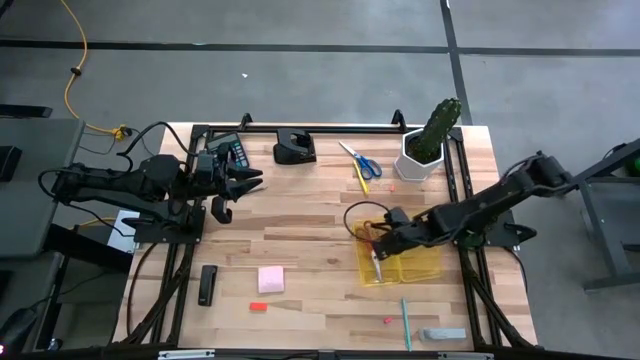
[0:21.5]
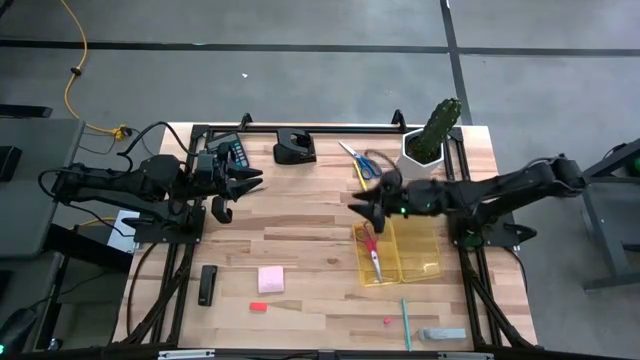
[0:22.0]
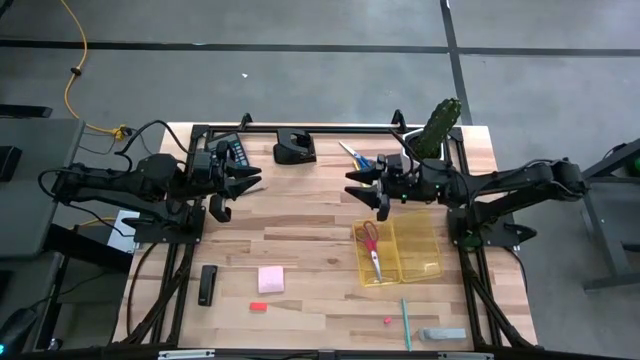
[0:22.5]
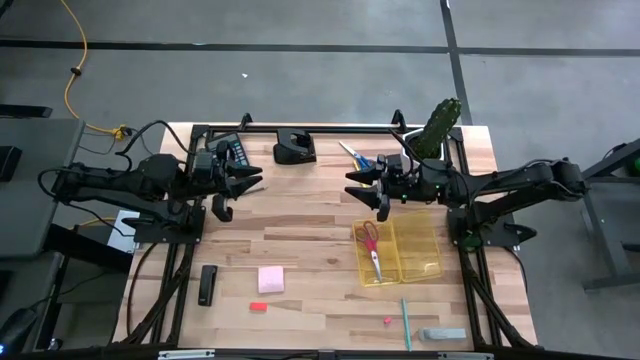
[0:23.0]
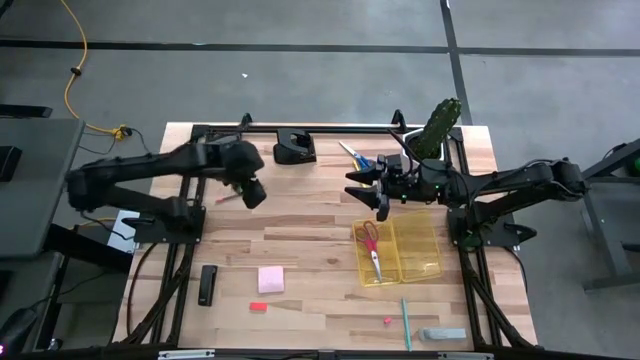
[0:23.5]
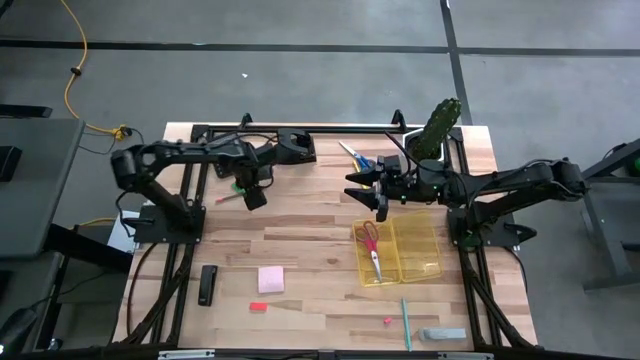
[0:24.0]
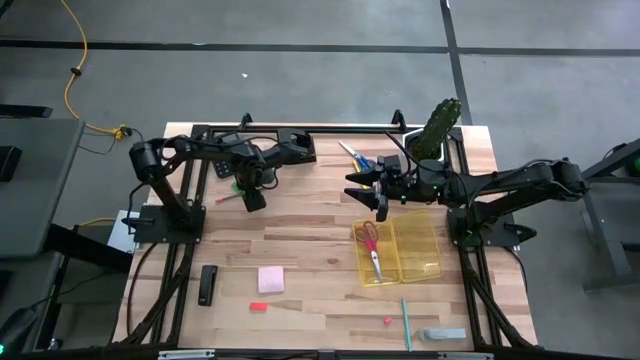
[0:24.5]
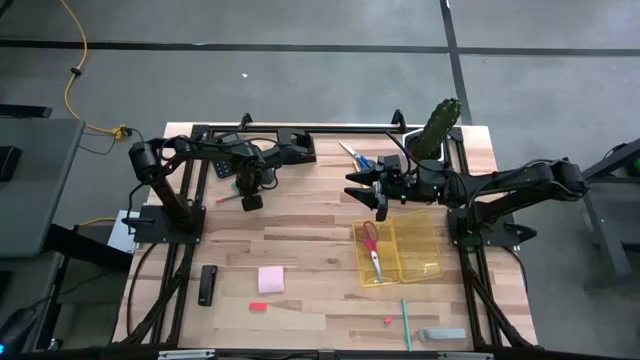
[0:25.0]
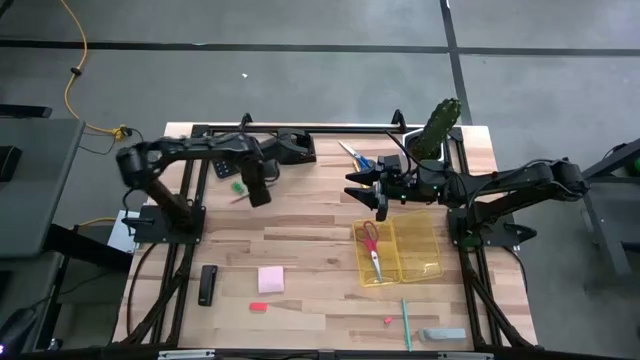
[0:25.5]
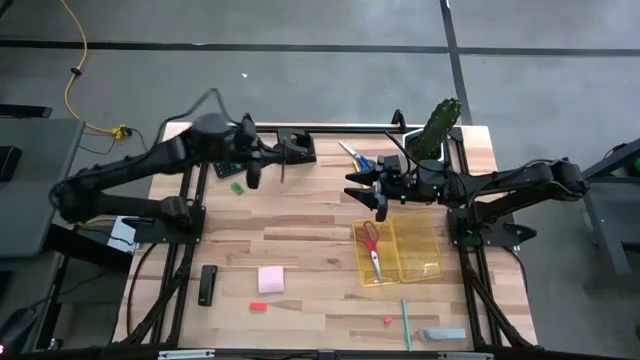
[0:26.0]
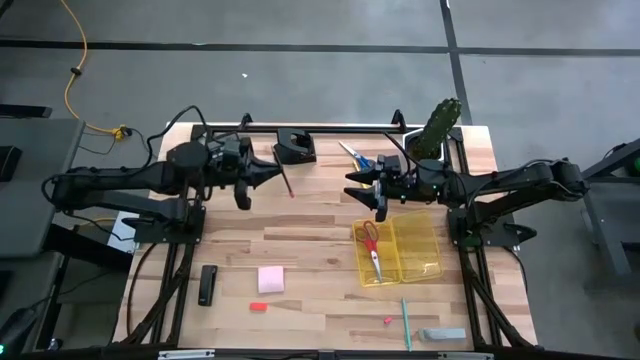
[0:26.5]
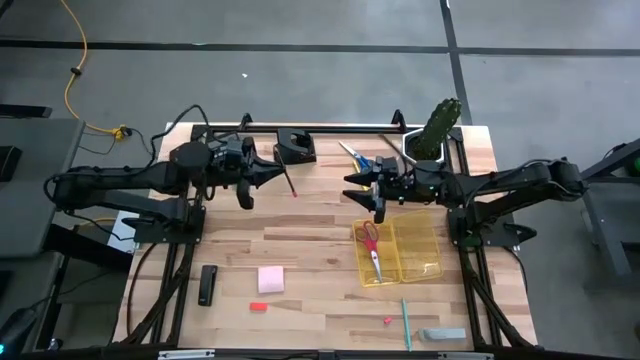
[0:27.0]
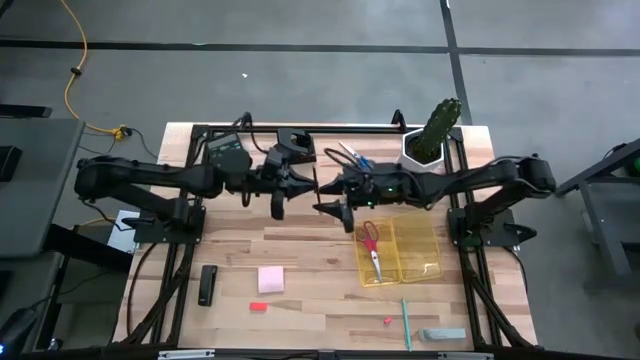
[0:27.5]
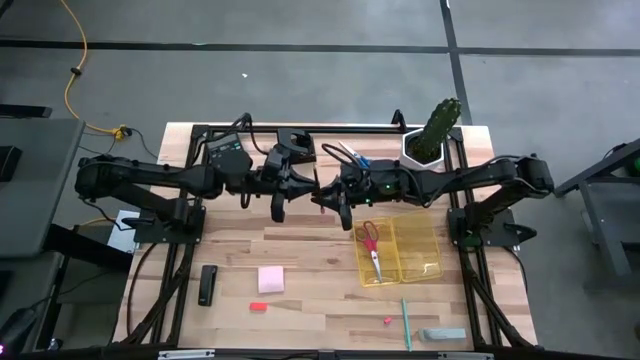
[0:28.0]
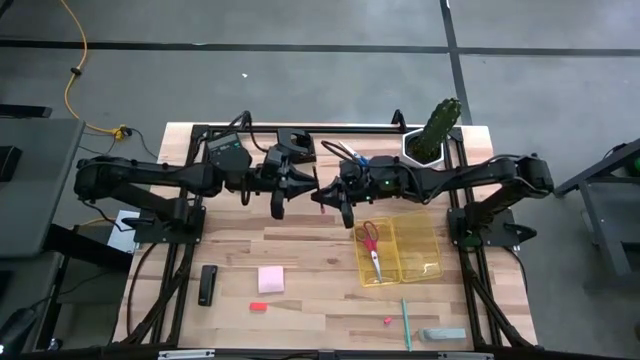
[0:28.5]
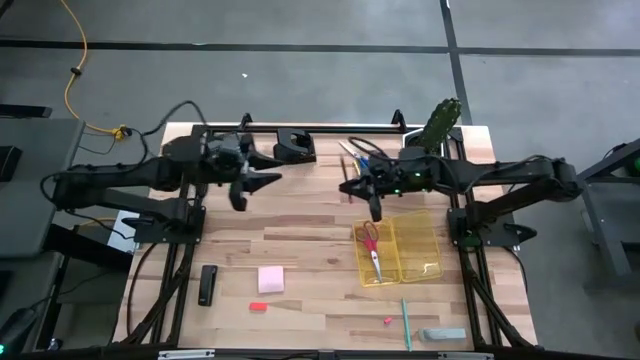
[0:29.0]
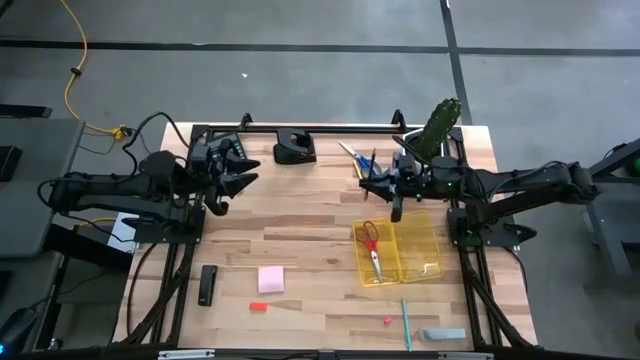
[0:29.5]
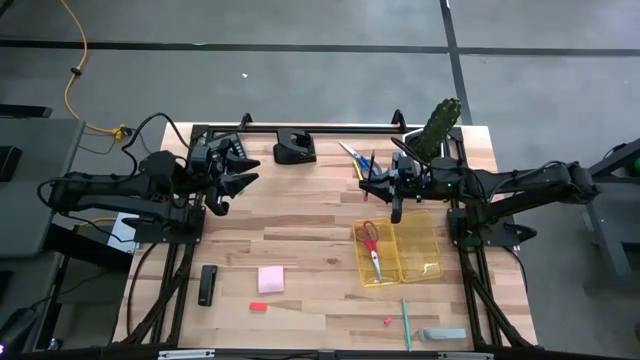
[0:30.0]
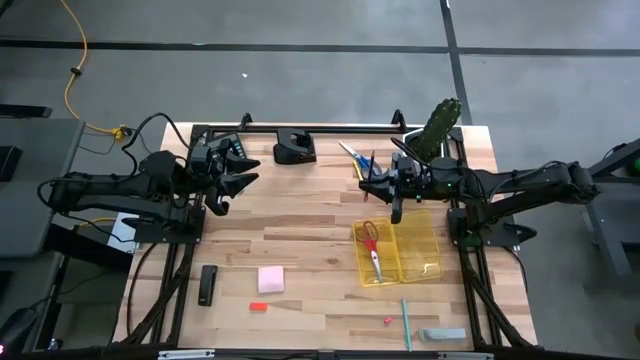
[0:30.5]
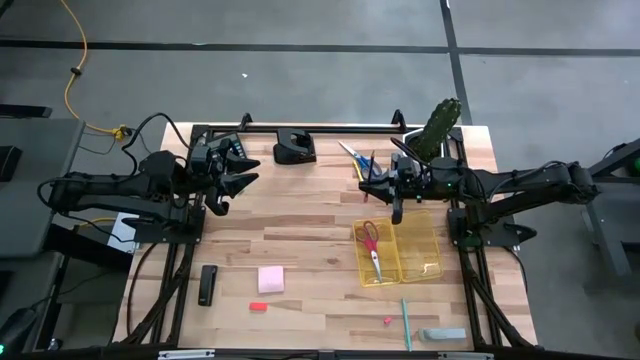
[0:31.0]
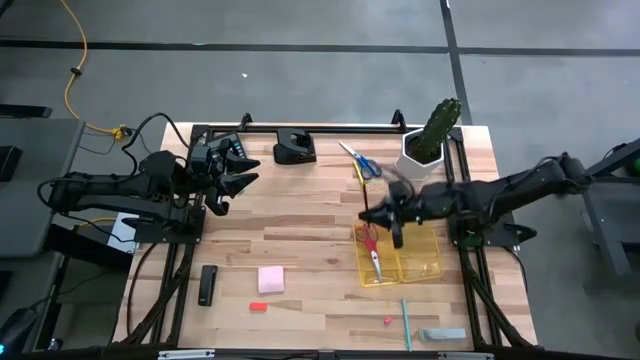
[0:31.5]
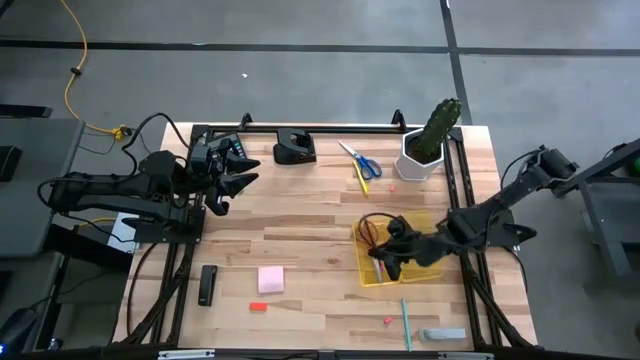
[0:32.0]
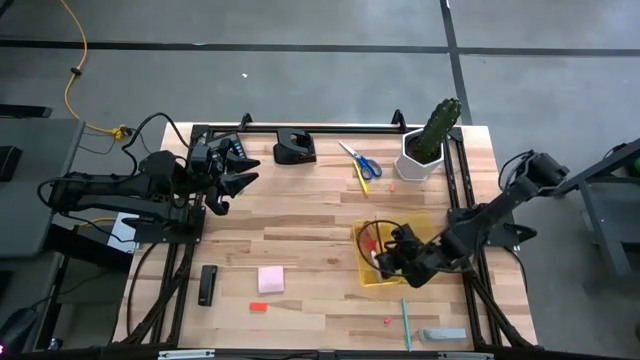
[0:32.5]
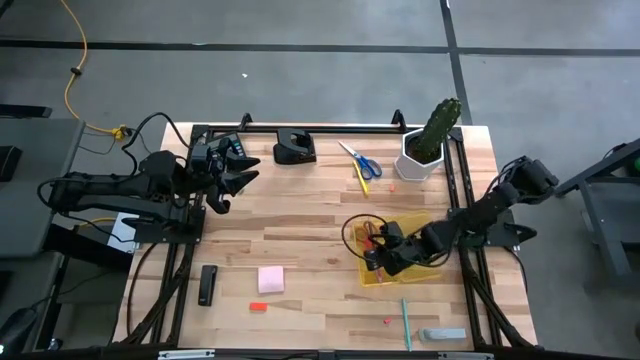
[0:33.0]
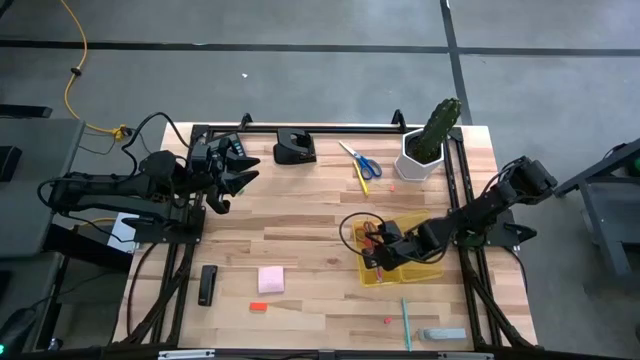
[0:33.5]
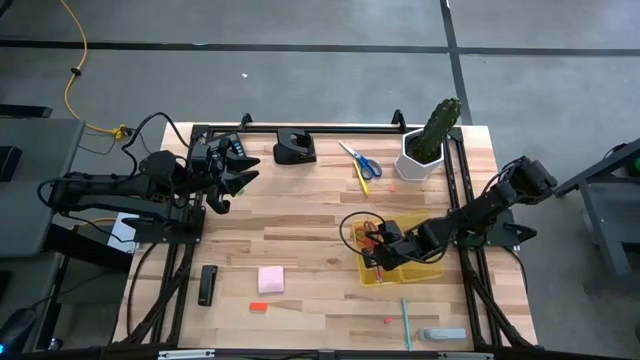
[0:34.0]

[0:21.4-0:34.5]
Task: Pack school essentials
Put the black pencil into the yellow box

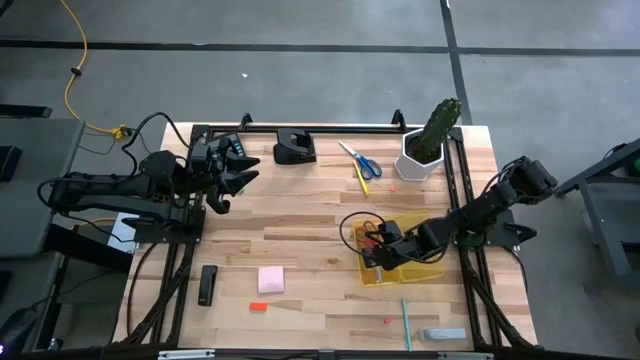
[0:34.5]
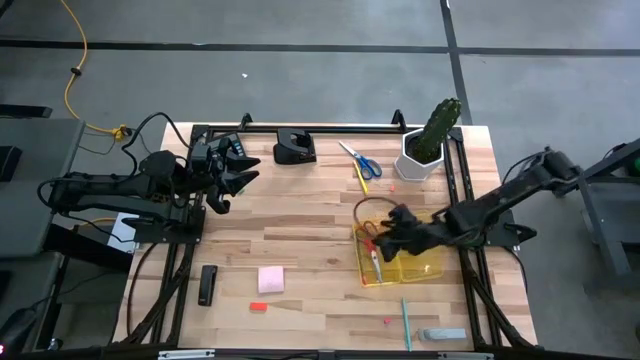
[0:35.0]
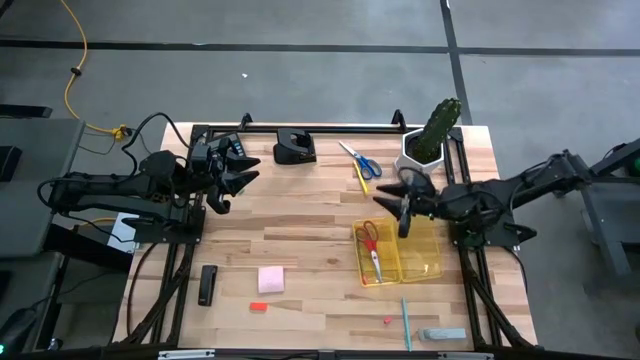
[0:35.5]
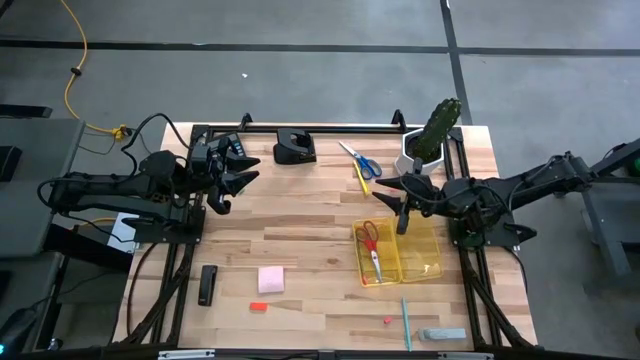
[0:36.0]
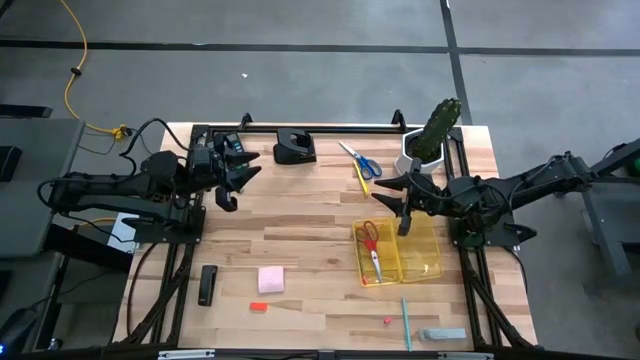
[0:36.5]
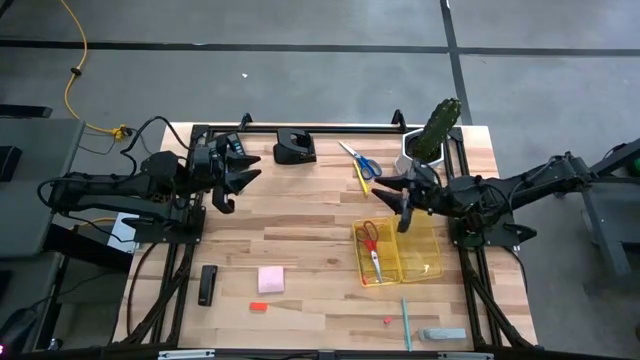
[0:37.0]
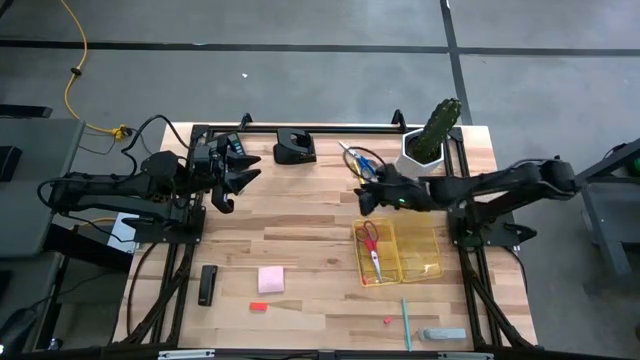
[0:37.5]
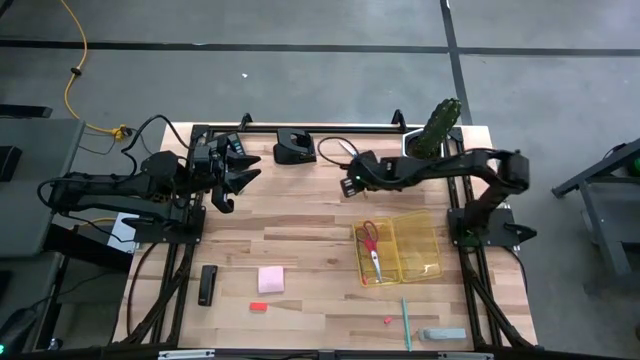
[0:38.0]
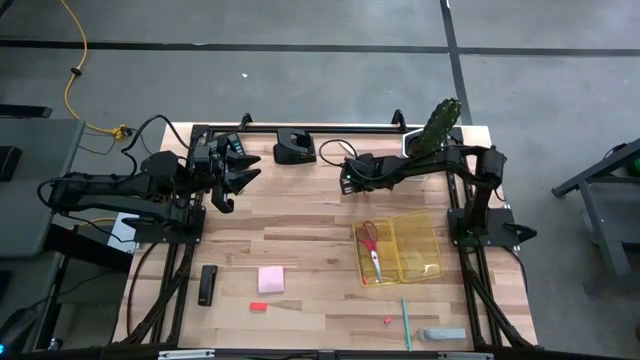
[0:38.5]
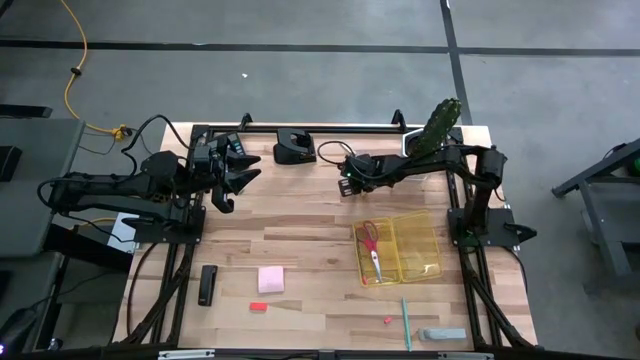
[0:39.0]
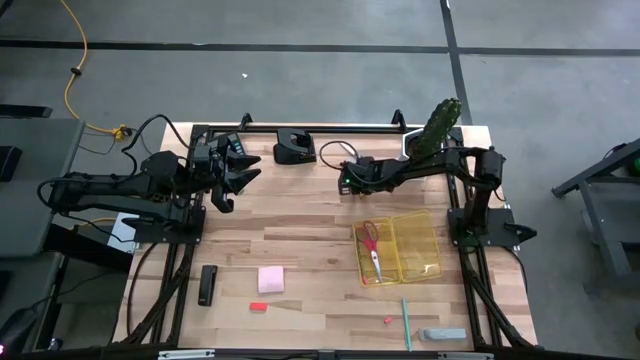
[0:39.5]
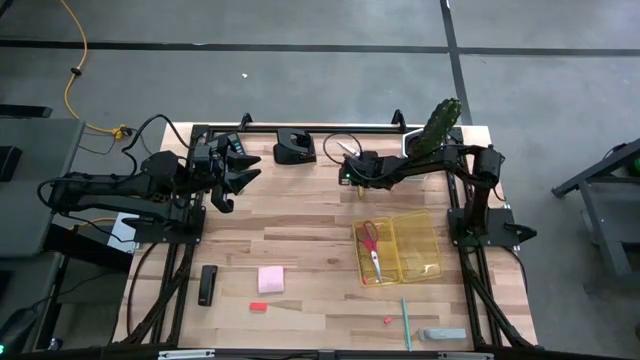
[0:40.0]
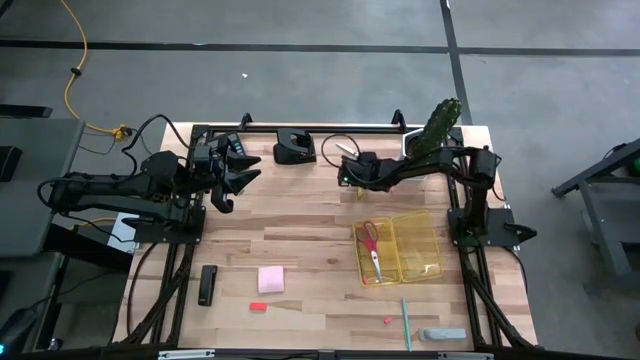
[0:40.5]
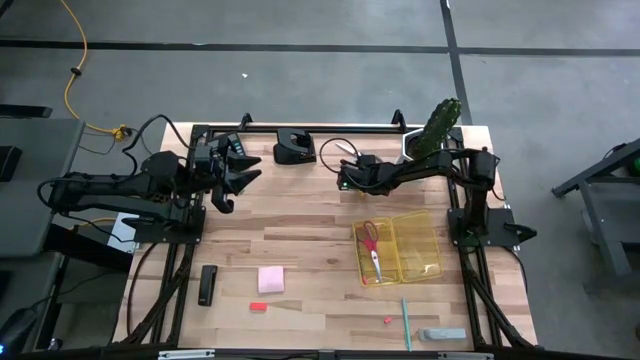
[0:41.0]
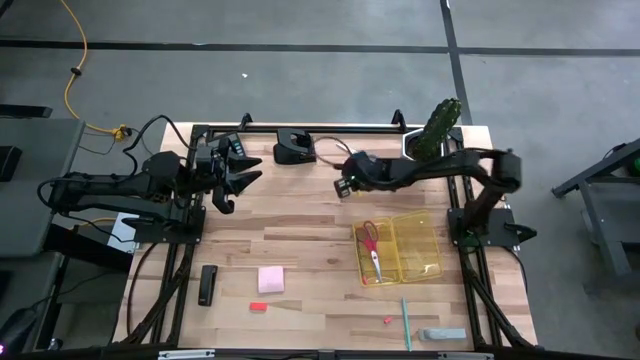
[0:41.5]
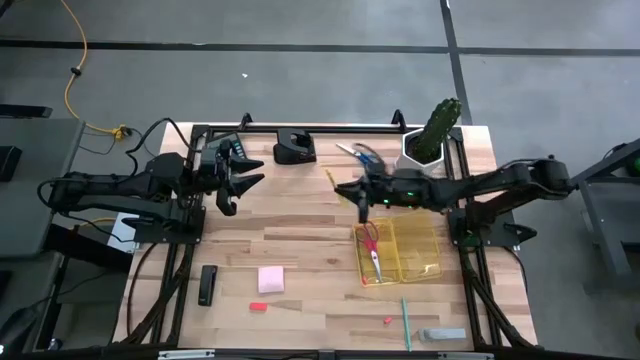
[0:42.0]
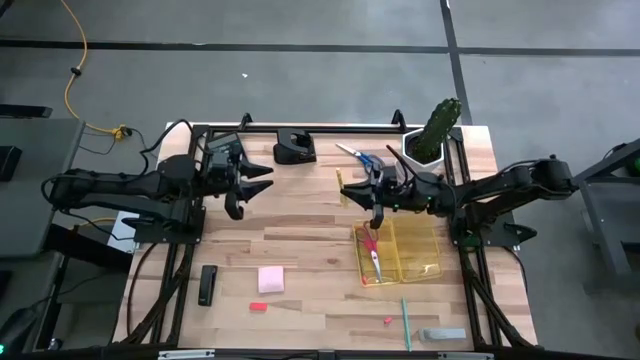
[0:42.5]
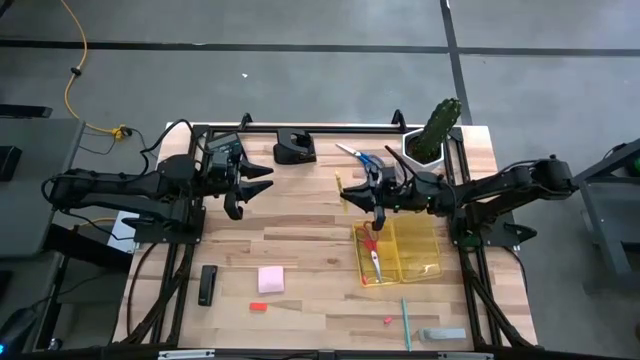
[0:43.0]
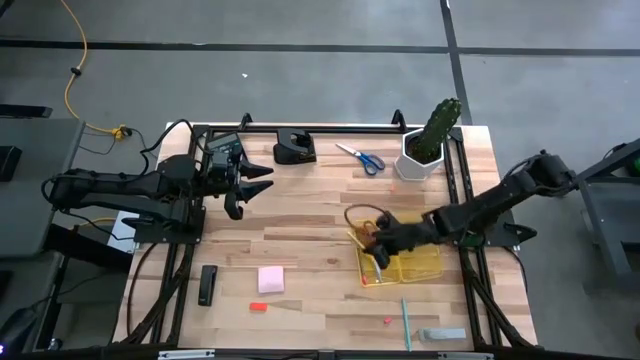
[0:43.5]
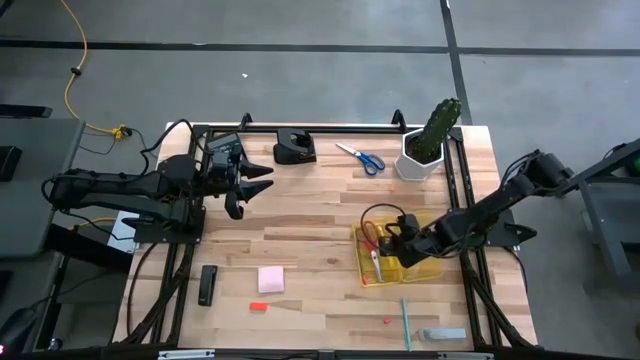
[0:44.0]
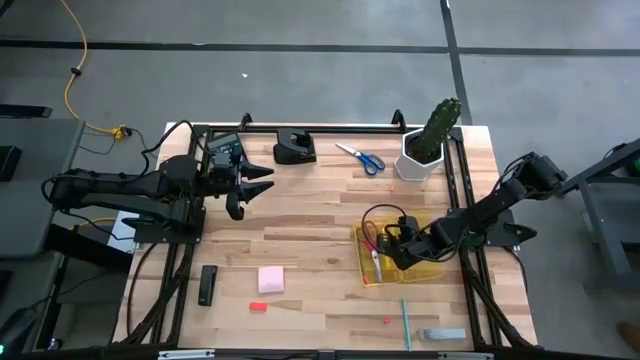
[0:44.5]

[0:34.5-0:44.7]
Put the yellow pen into the yellow box
